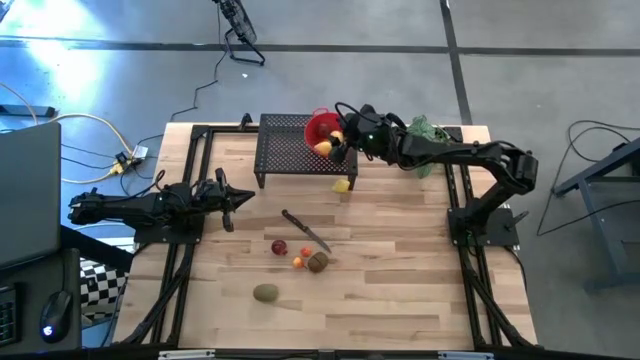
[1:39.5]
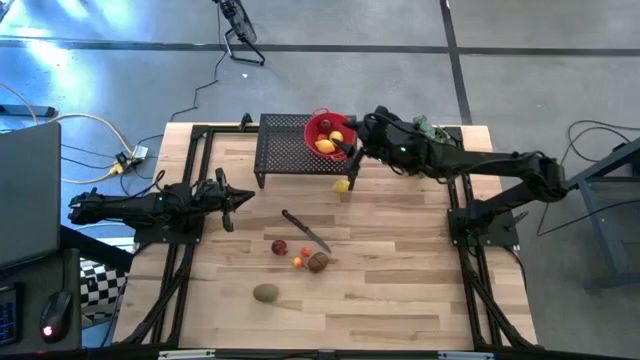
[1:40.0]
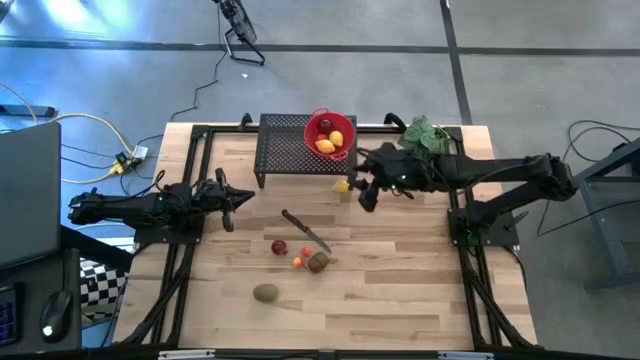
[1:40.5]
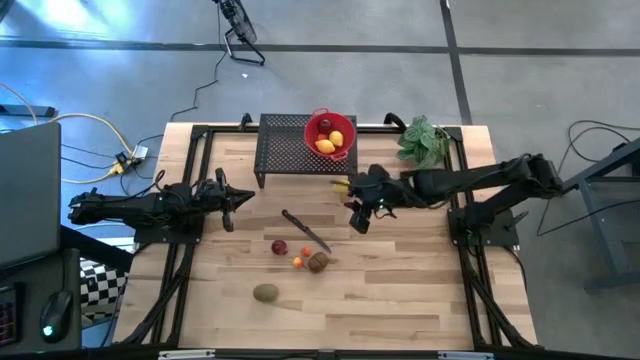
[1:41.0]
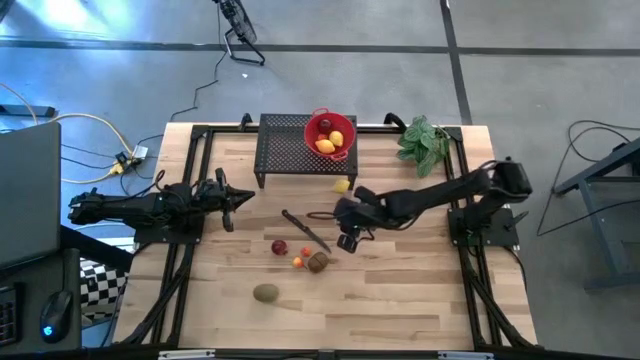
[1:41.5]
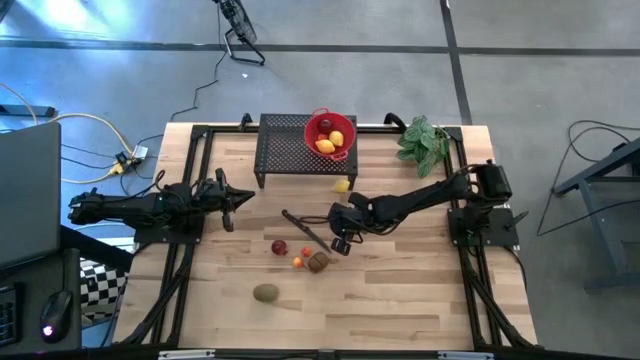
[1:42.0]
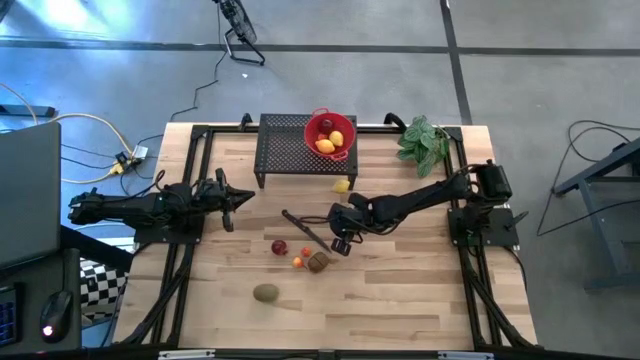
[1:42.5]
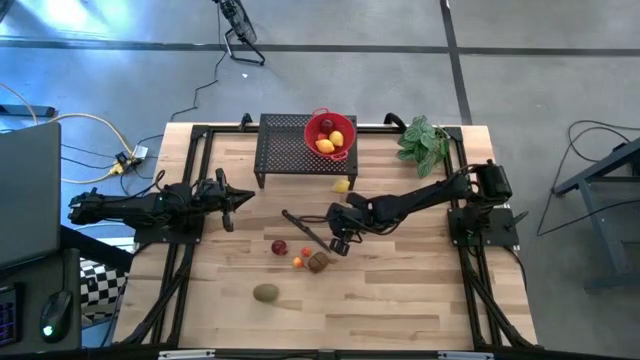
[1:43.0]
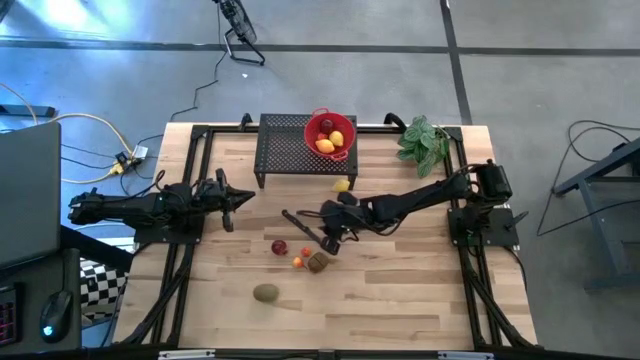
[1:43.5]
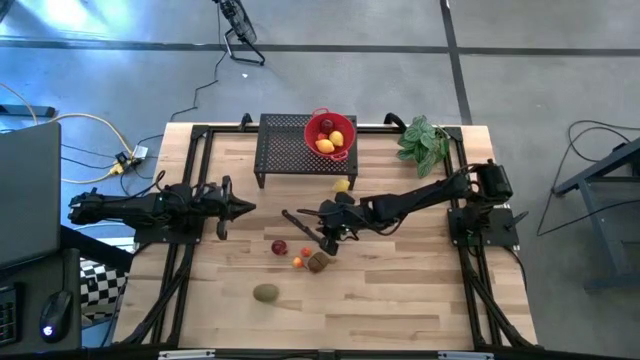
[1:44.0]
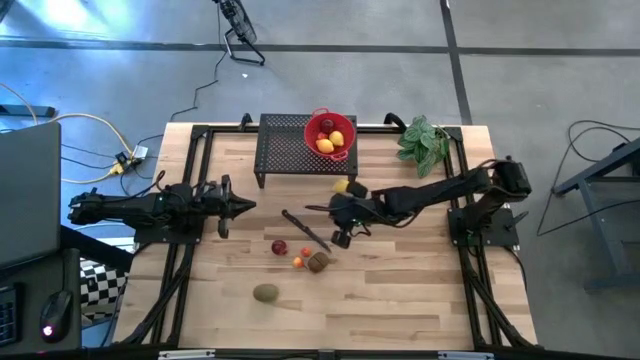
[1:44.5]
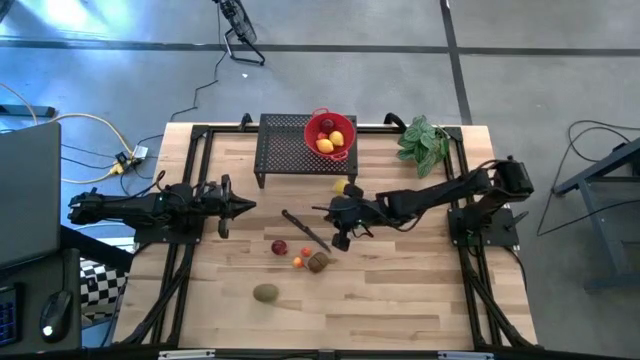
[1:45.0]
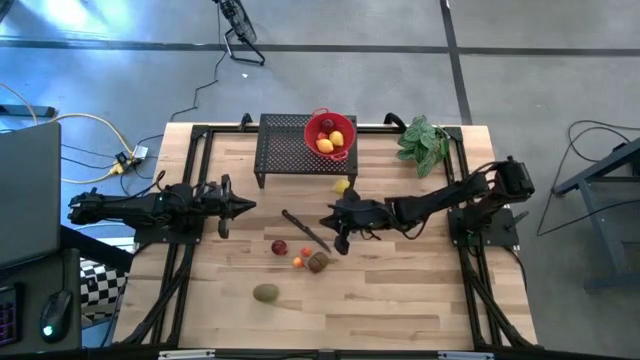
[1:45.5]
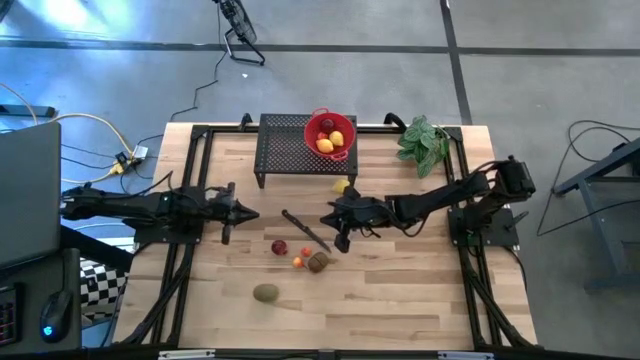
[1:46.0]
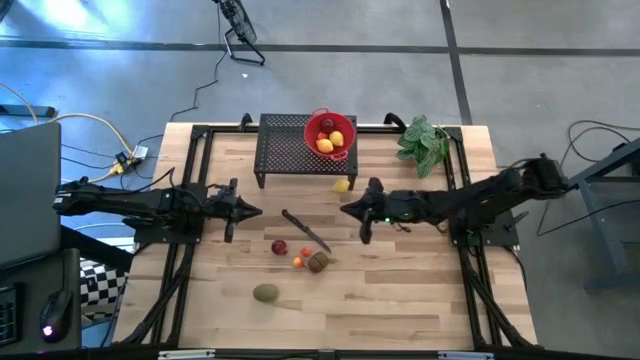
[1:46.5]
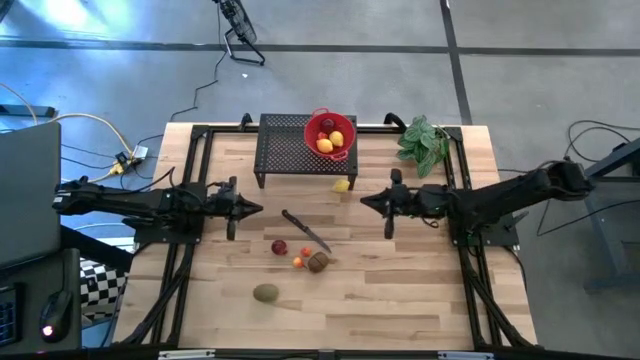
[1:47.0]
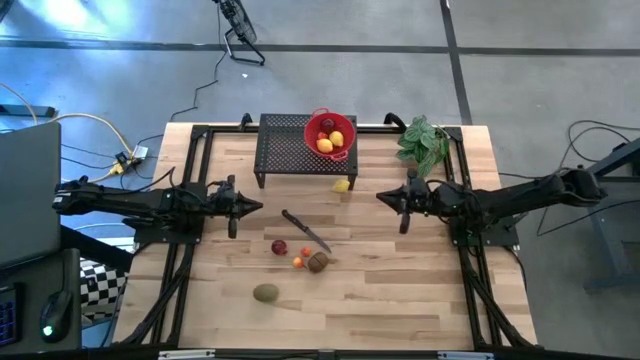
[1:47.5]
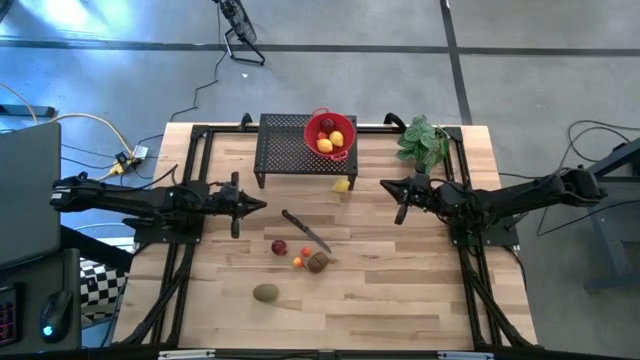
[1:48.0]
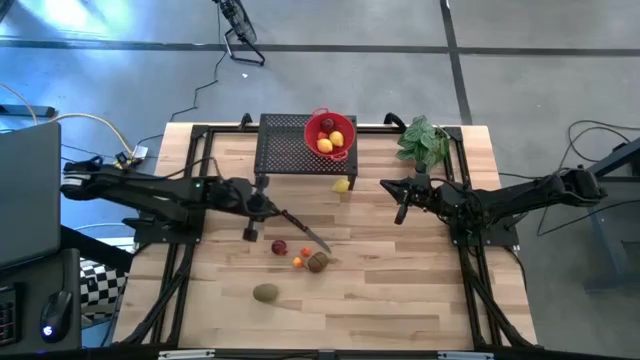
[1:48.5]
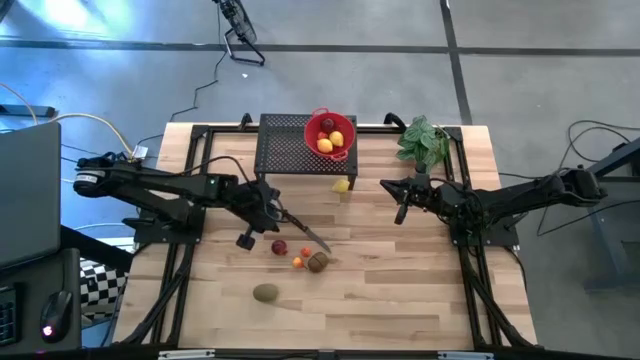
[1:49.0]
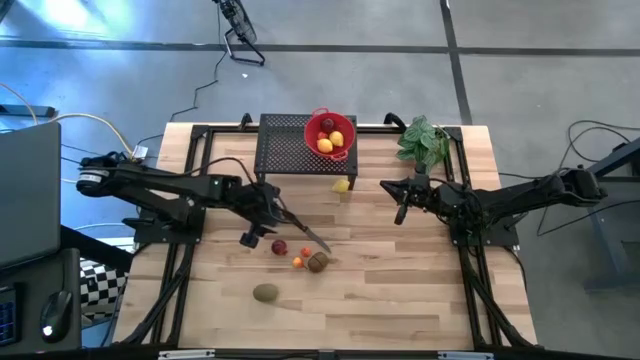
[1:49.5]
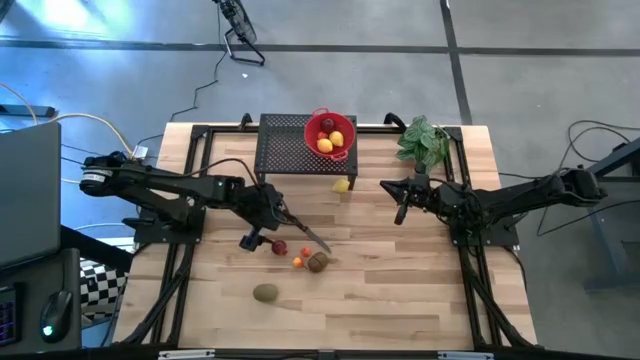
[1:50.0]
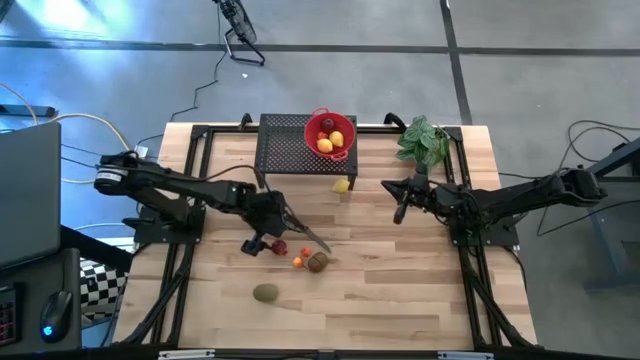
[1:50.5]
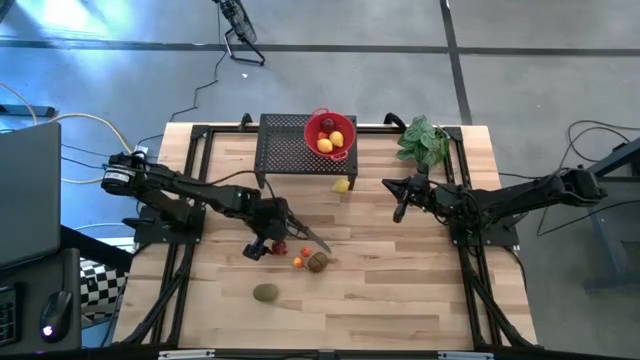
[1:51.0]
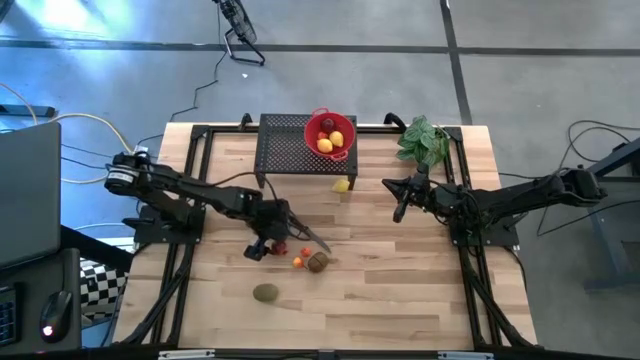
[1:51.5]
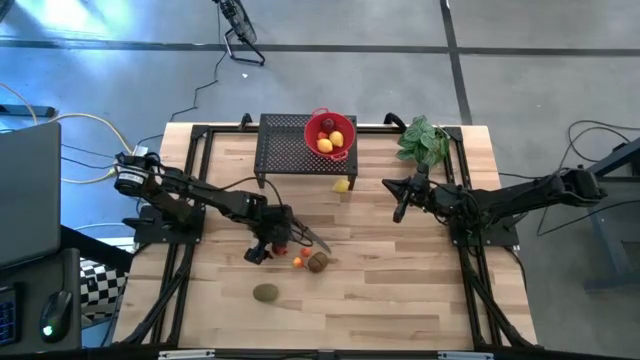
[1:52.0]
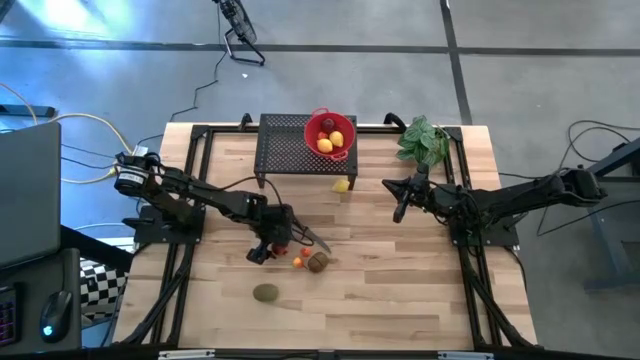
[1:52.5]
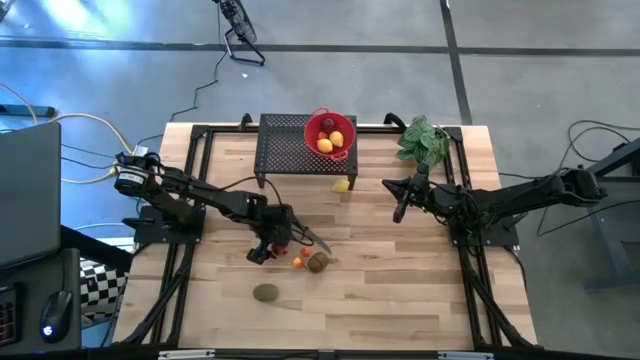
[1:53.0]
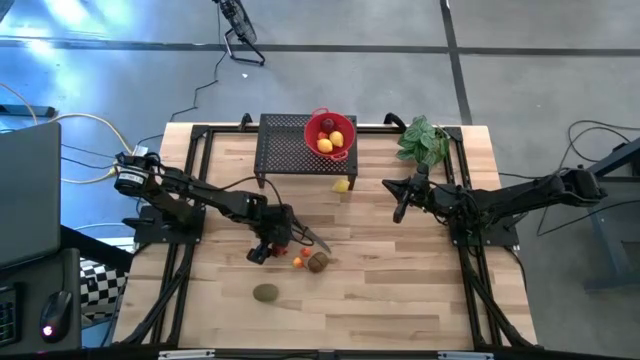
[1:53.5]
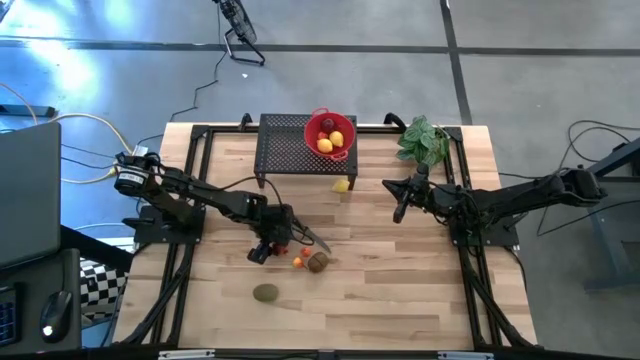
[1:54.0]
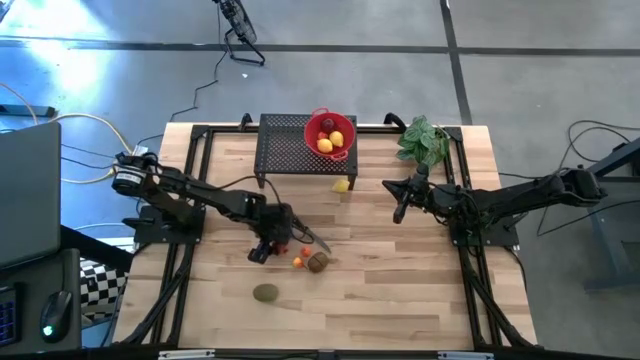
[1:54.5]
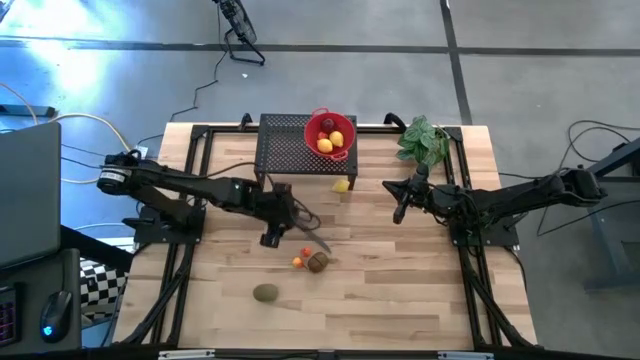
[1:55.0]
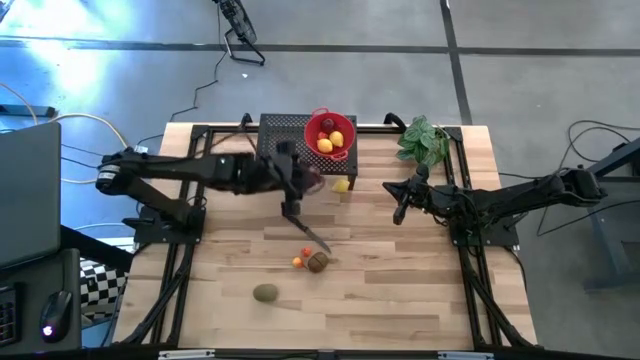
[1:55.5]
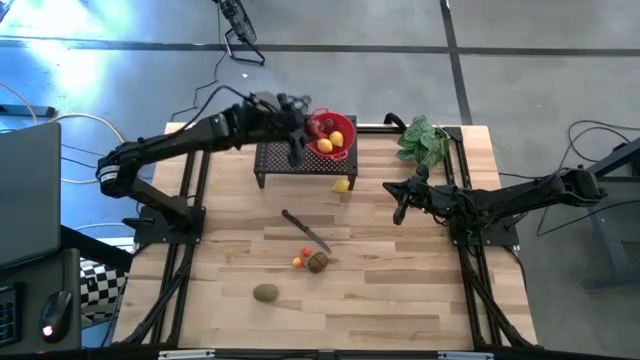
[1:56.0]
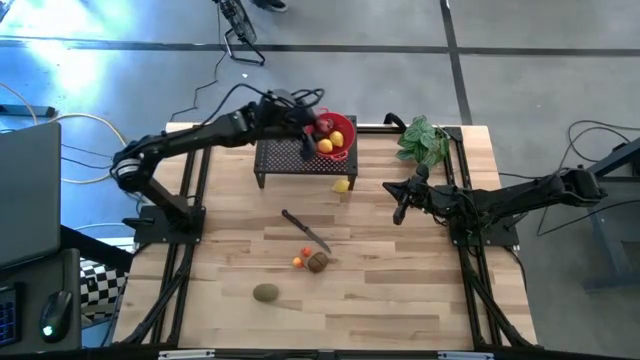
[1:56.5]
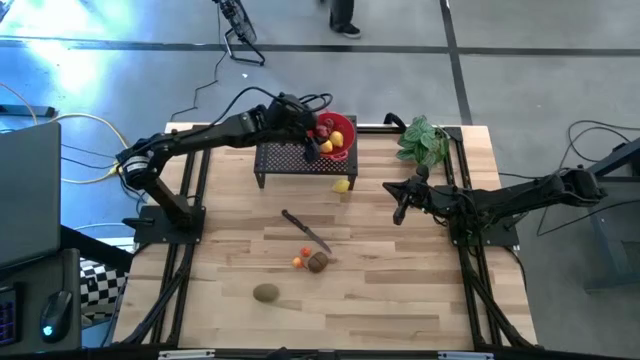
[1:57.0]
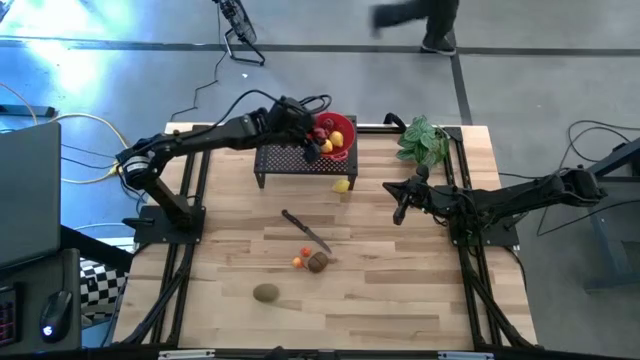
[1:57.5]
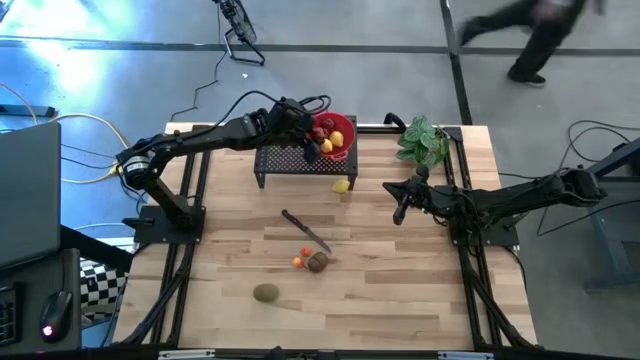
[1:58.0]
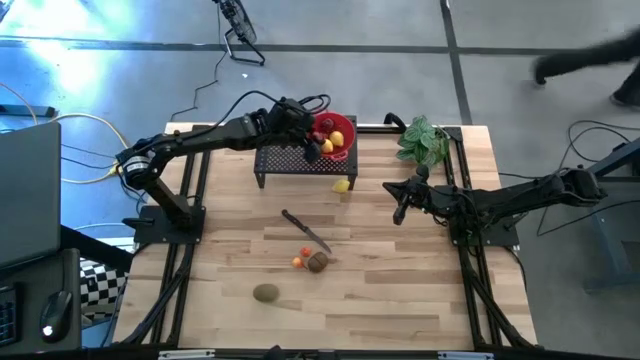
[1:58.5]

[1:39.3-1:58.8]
Task: Pick & Place Fruit
Put the pomegranate into the colander on the shelf

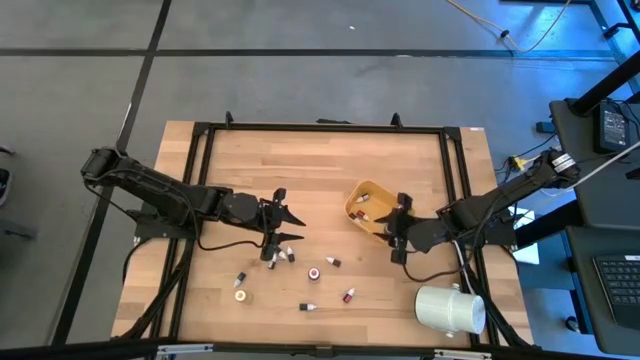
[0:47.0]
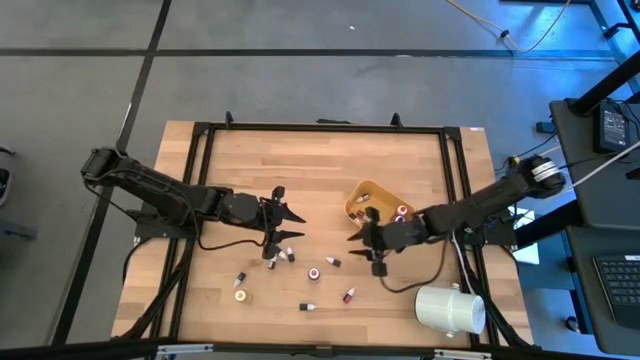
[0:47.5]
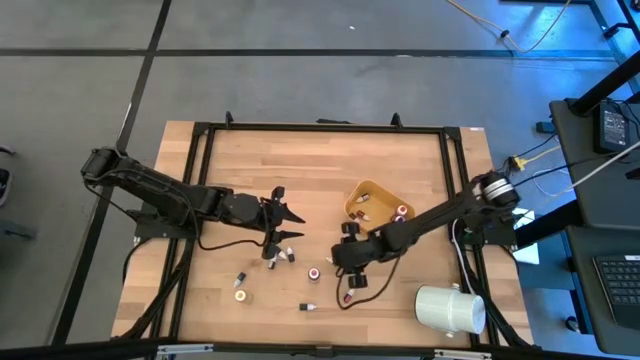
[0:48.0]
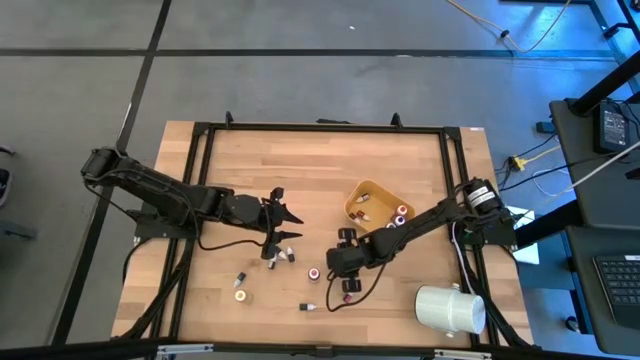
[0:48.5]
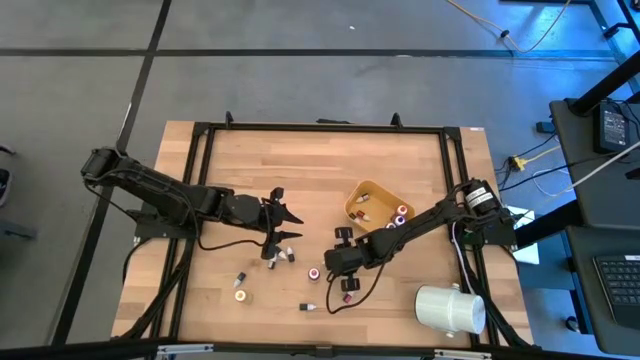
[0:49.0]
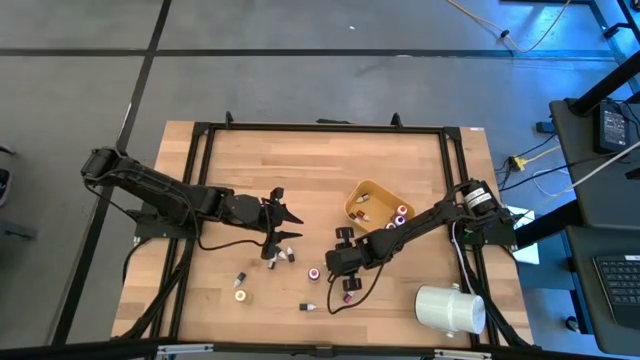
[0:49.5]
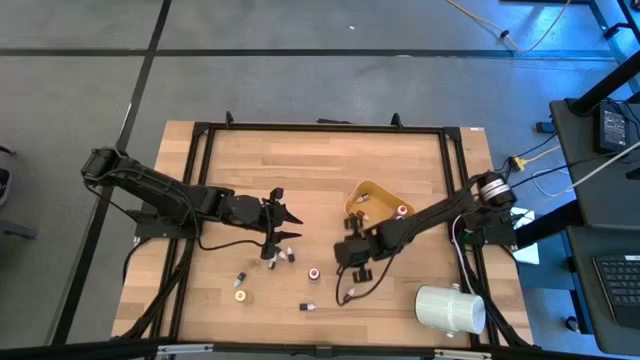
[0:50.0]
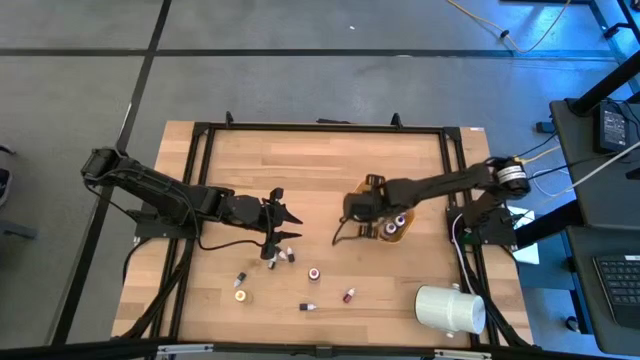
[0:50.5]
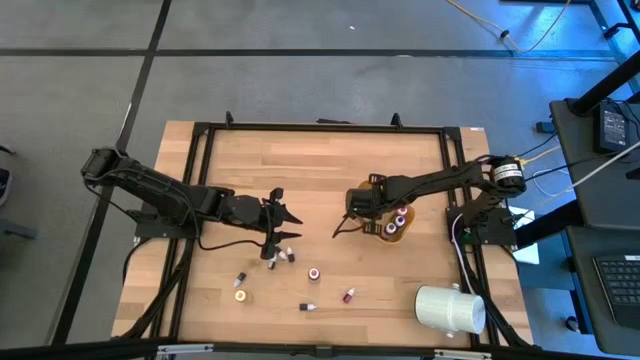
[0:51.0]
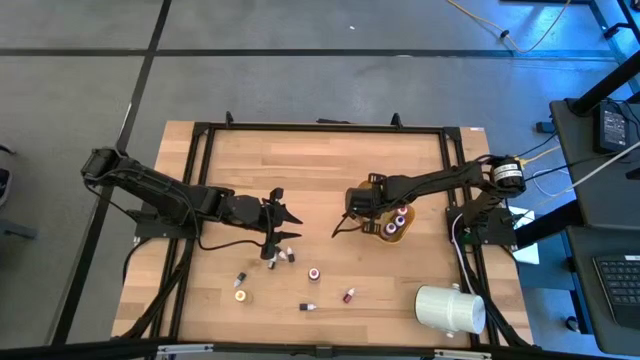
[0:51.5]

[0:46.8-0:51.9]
Task: Pick & Place food coloring
Put the right small red food coloring bottle in the yellow bin
